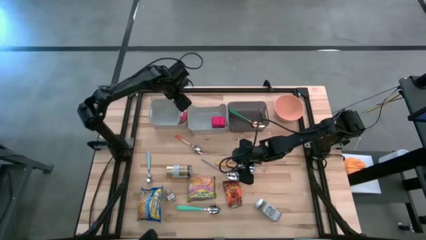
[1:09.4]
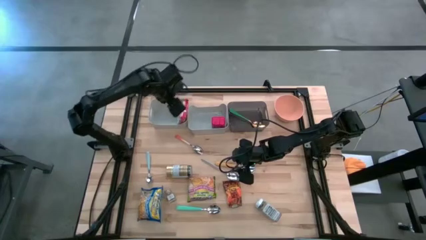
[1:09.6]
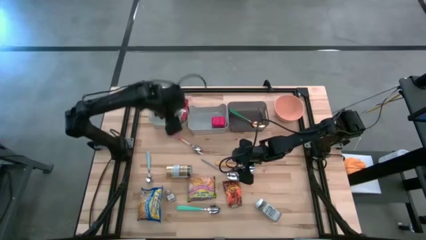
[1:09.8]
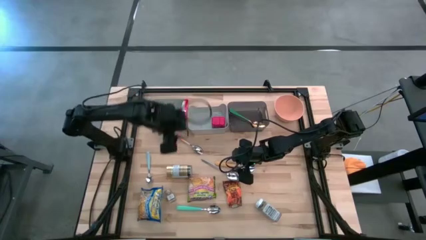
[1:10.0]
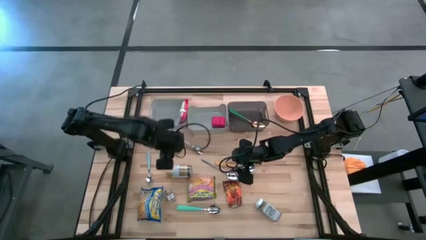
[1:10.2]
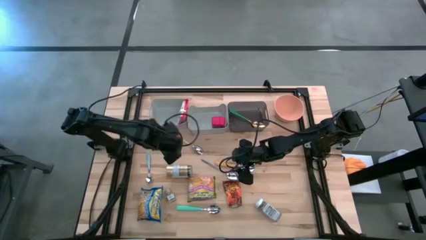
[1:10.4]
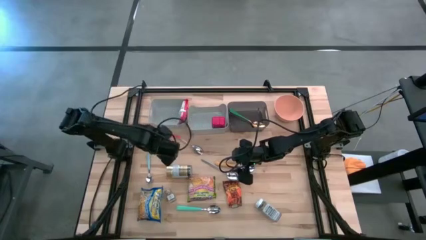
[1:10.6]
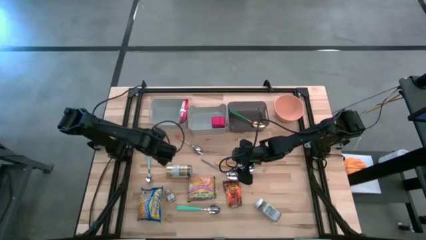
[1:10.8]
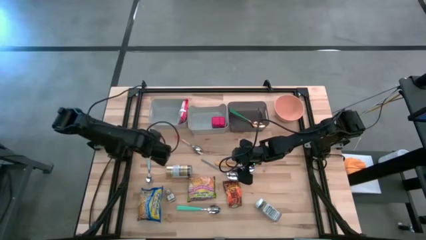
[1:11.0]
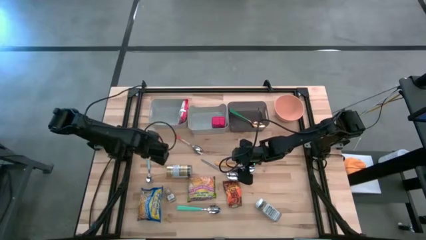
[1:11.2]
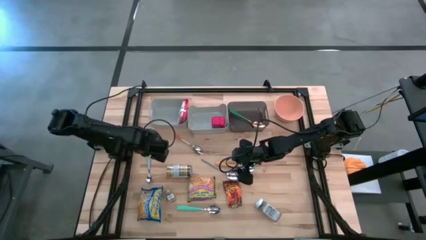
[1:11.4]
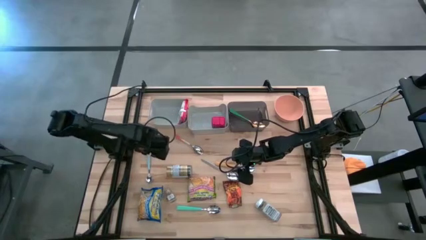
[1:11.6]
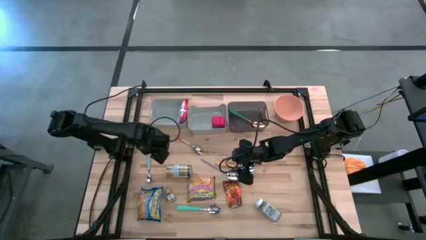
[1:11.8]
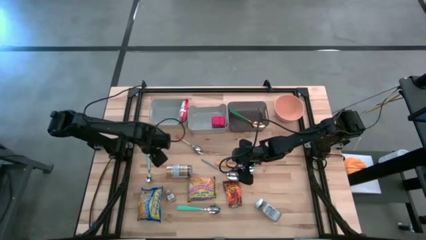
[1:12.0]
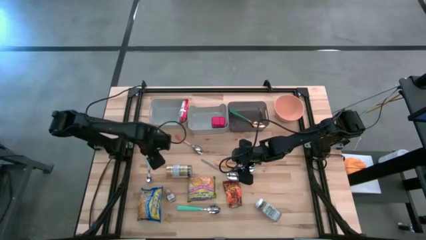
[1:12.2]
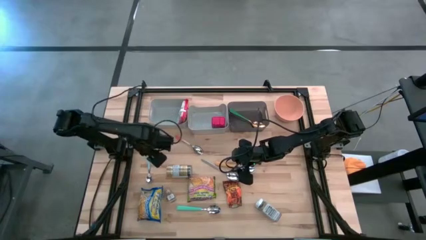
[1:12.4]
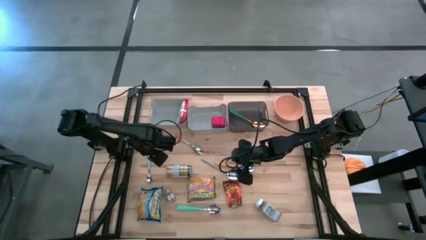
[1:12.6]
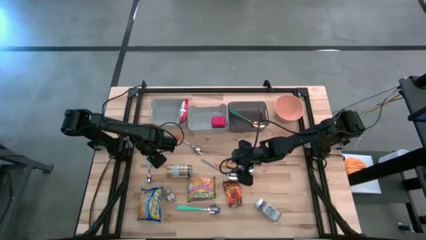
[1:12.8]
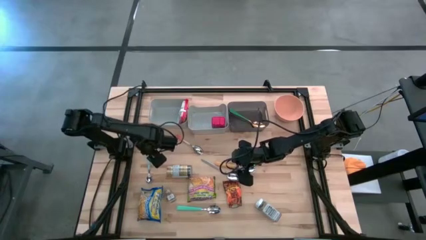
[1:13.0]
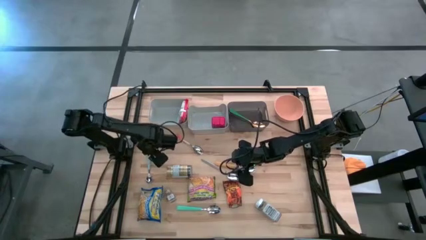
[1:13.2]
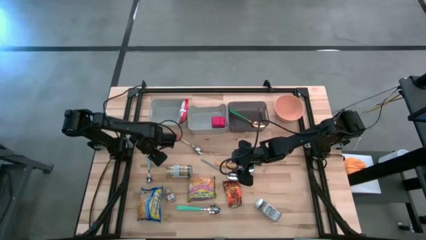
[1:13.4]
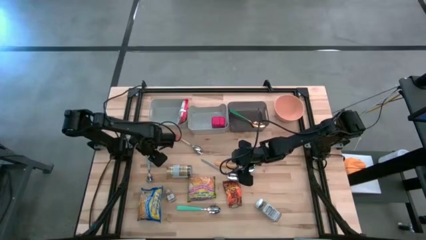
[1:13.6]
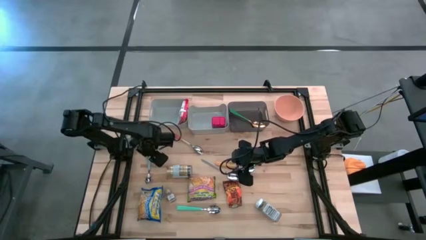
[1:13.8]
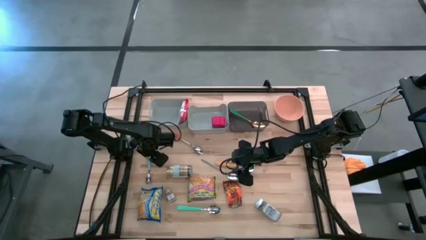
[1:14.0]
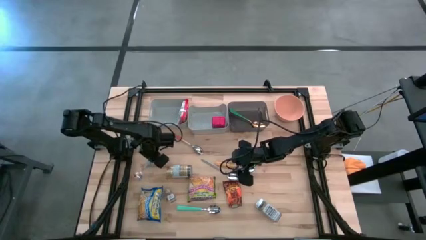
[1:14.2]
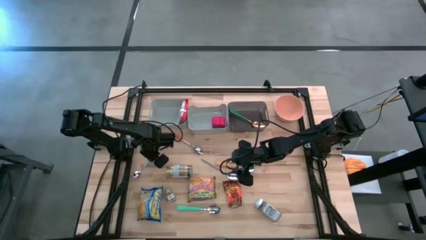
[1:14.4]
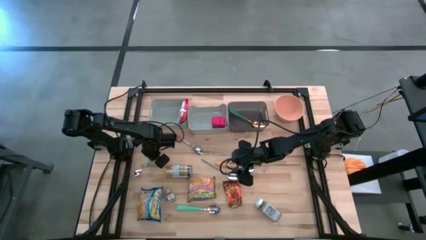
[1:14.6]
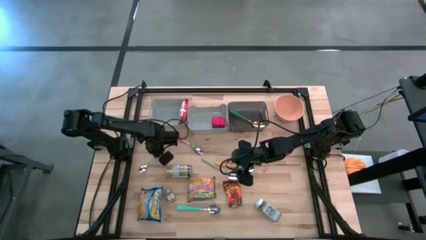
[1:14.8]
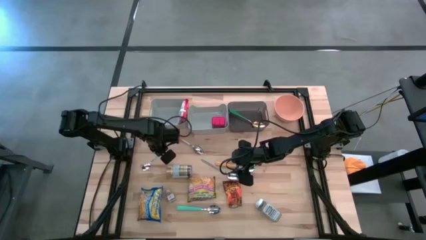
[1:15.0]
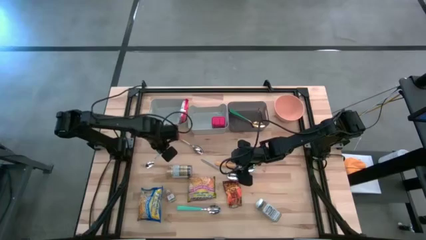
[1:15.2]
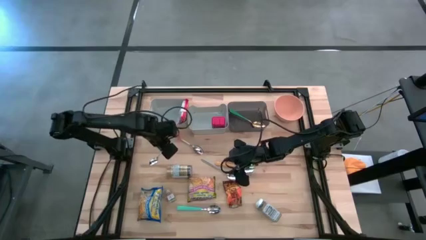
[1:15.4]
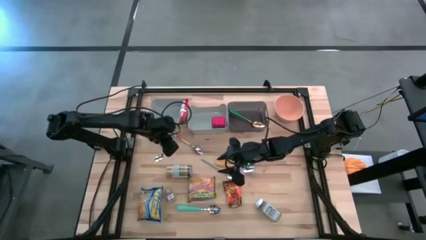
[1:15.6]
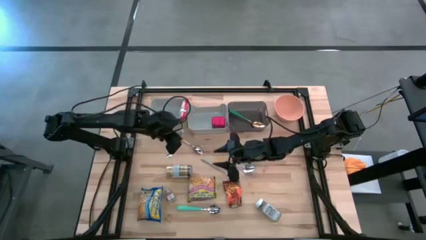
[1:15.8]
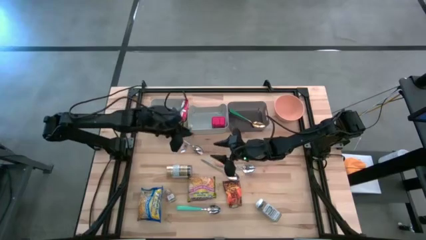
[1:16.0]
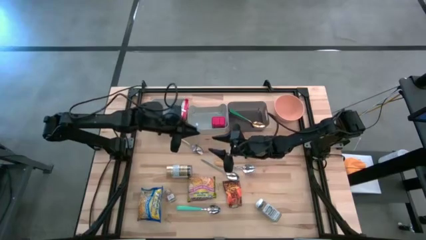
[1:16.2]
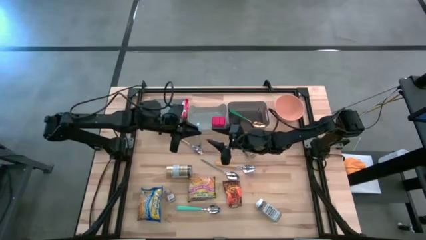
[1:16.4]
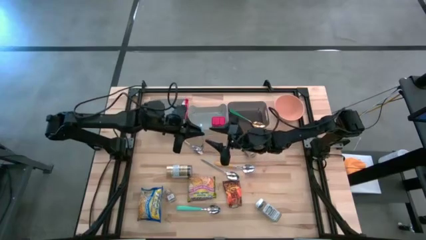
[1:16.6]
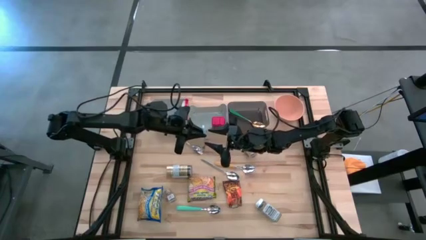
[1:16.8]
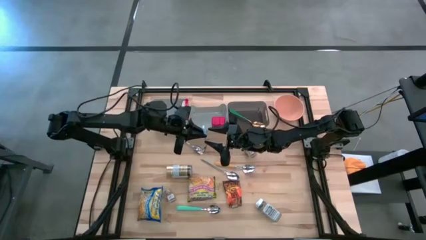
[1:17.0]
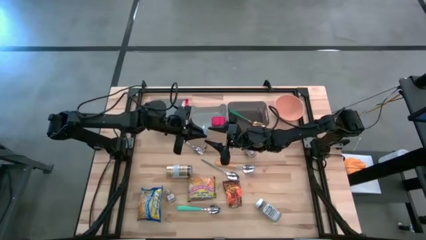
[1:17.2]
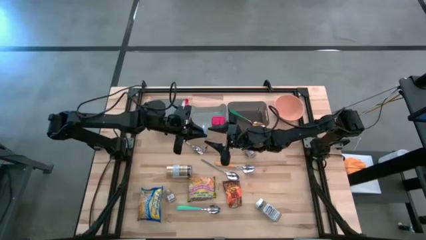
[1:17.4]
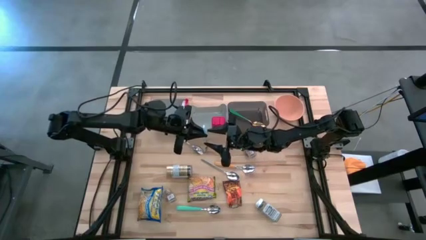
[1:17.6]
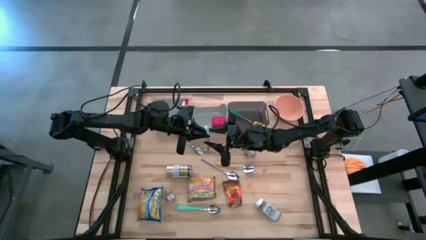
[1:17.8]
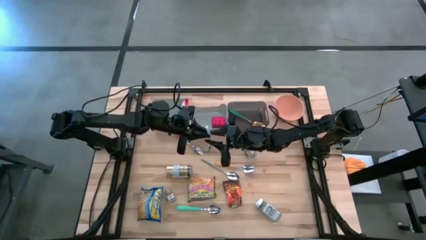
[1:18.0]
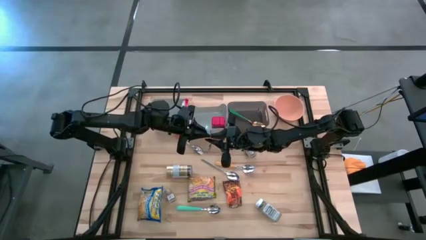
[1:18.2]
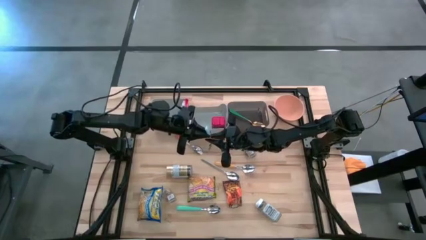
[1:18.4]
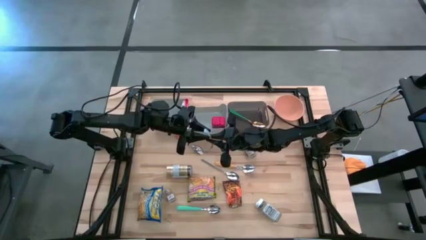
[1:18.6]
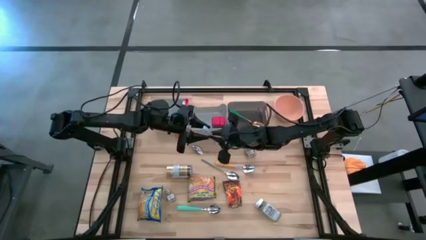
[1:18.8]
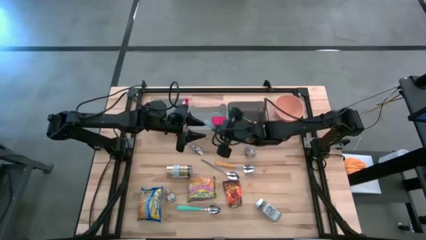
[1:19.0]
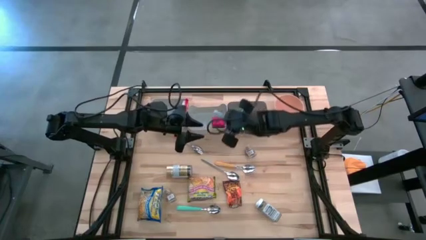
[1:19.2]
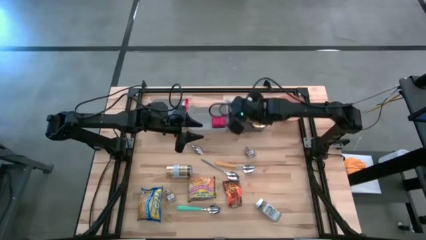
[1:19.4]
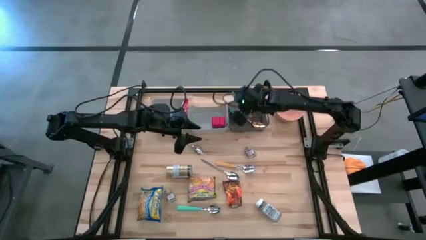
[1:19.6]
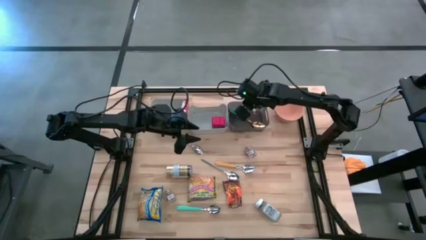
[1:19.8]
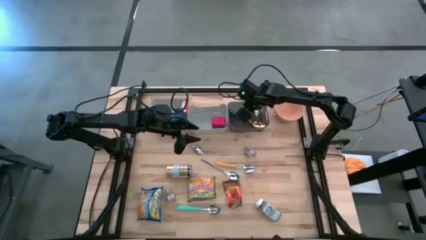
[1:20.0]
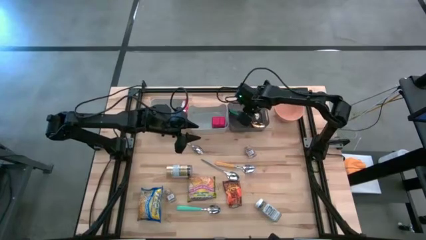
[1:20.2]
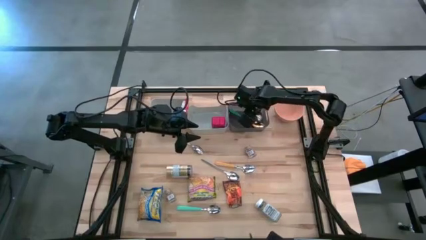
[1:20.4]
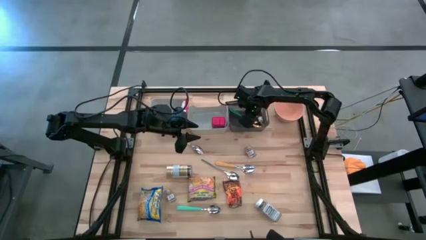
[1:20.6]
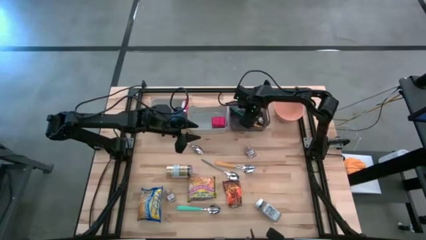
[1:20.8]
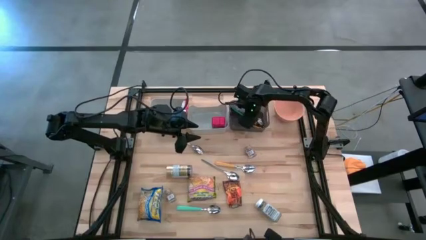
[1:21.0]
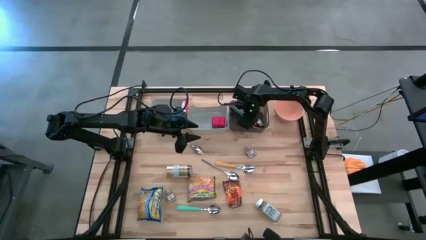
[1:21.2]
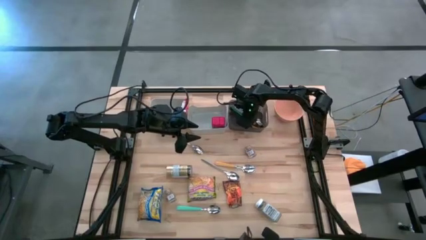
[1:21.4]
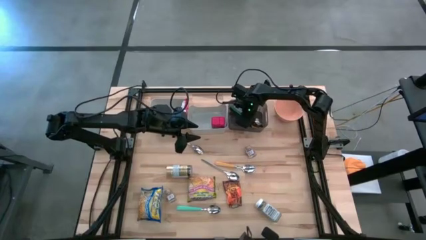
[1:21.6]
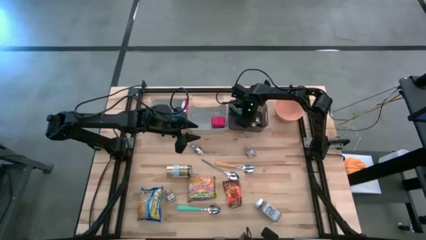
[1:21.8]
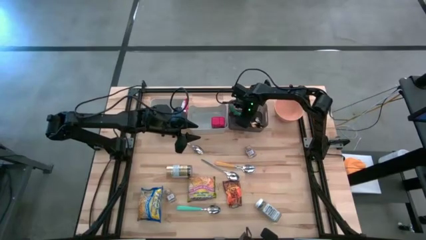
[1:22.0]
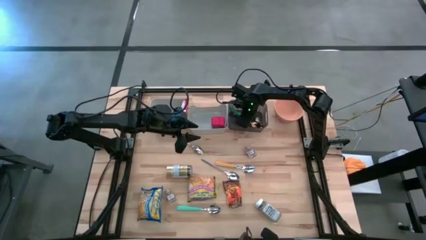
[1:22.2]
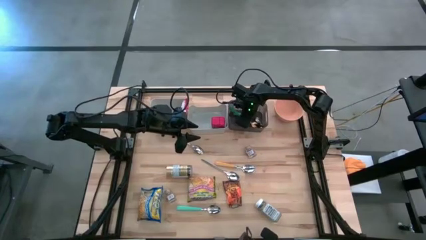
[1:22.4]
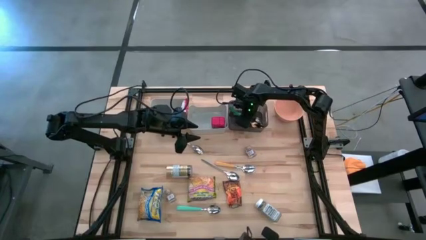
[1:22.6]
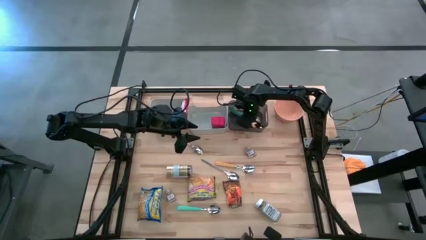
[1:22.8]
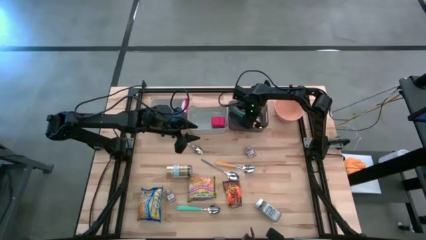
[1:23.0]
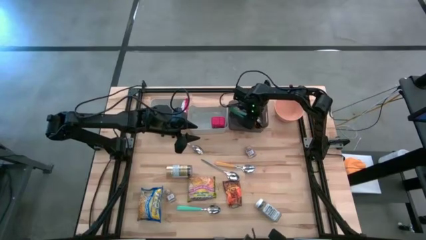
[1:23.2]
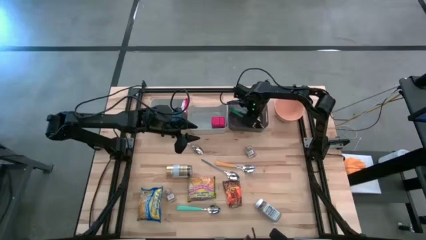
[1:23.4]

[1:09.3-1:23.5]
Put the light blue spoon into the black bin
